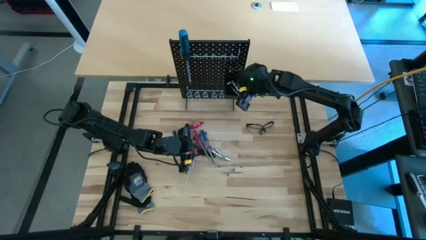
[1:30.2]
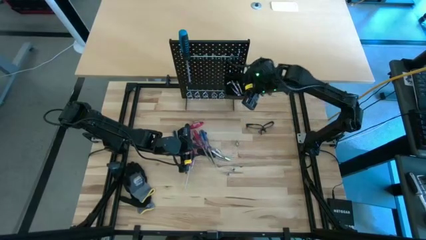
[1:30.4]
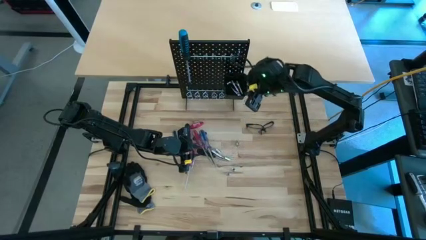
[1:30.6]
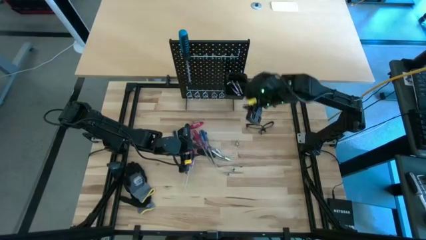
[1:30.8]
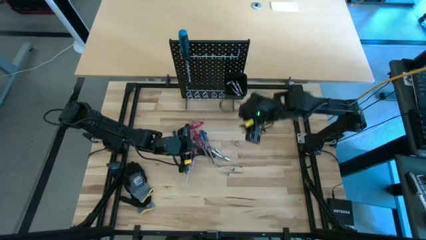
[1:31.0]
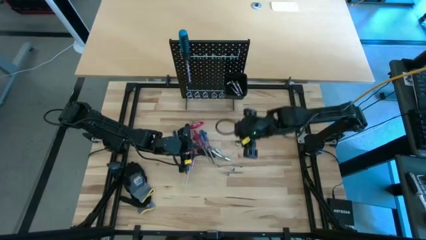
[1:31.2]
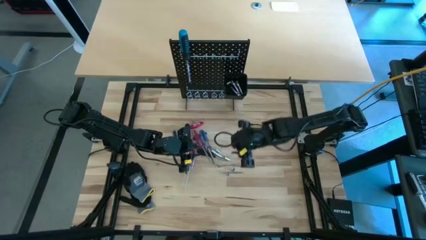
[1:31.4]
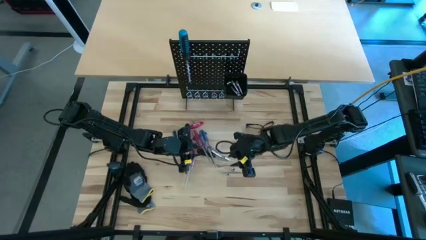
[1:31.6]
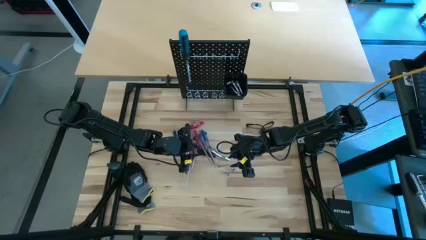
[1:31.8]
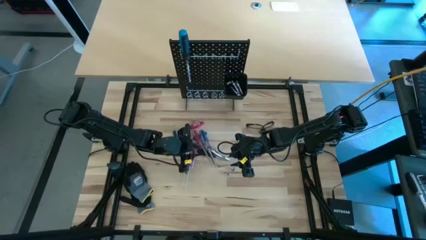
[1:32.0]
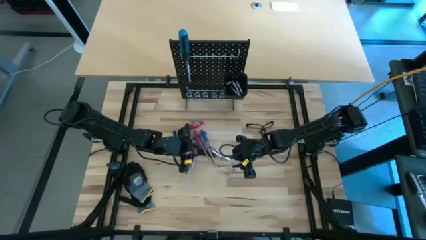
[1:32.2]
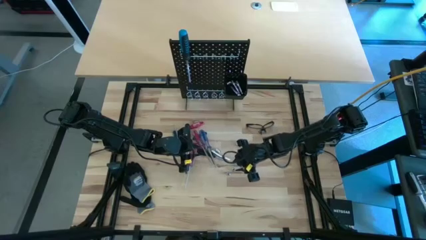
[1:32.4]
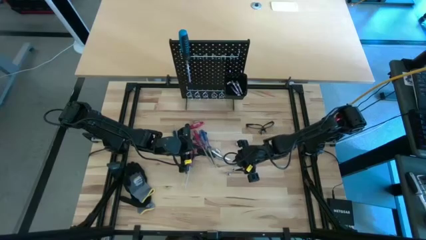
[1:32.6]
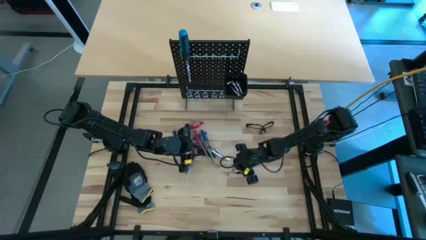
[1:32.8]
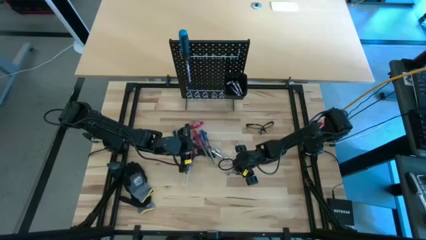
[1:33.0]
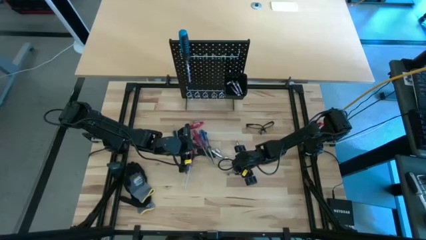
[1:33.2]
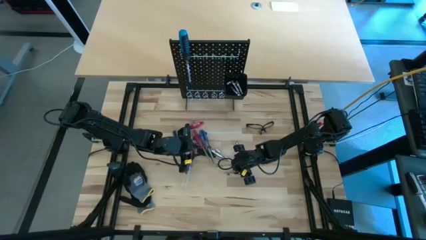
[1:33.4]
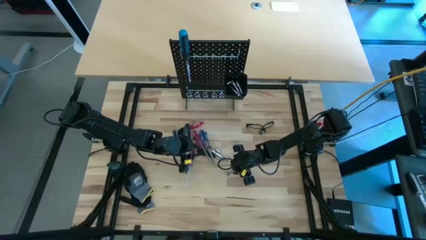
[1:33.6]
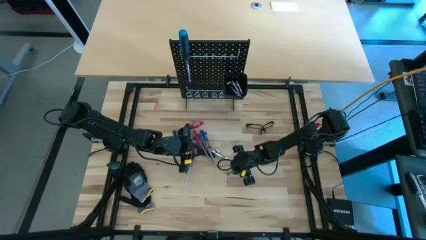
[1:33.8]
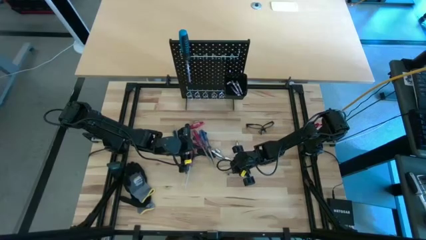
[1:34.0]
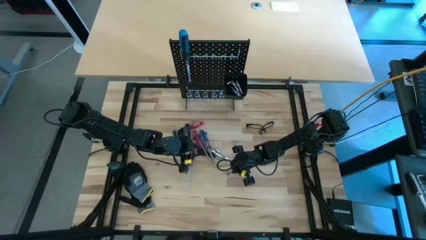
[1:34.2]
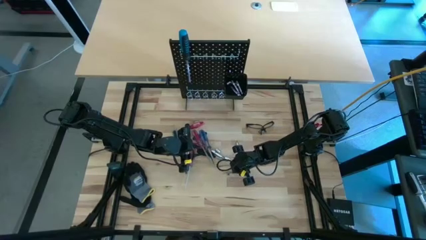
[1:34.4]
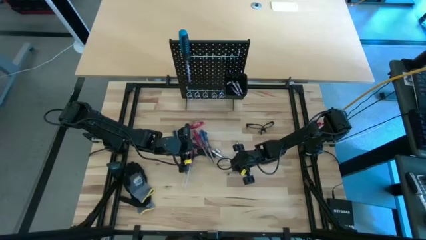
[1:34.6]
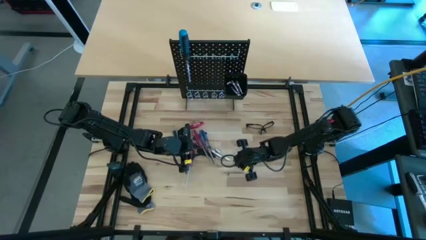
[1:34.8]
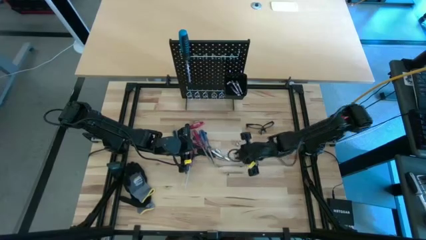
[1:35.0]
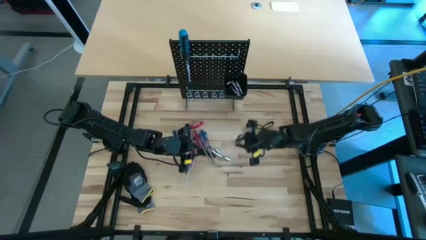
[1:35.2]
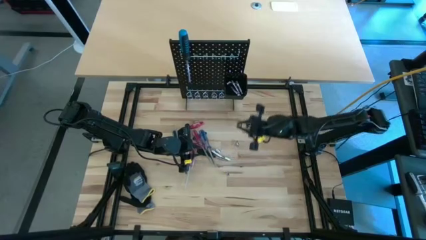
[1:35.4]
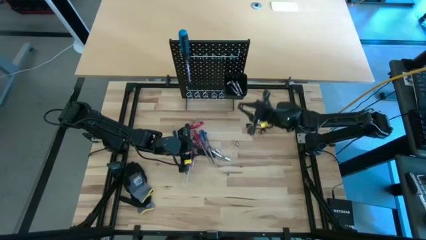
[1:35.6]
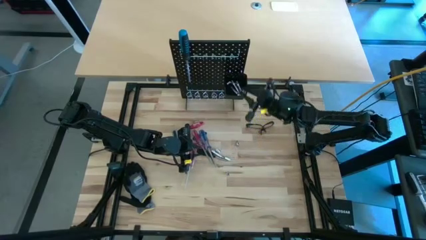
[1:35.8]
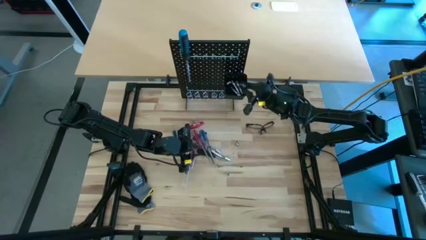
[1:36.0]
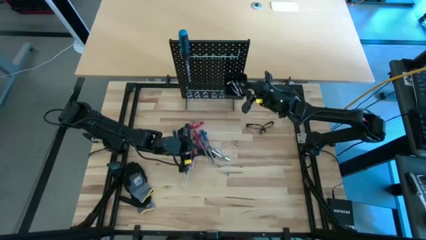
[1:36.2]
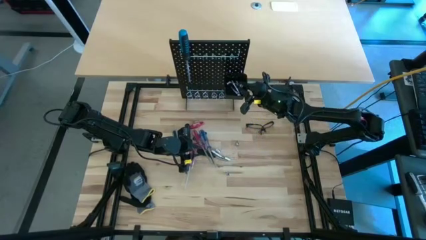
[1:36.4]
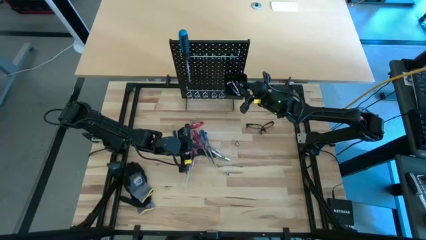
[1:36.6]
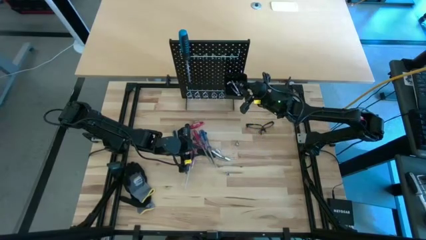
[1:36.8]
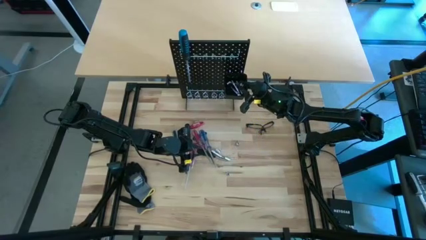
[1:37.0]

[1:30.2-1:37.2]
Task: Hang tools onto peg board
Put the silver socket into the black bin on the peg board

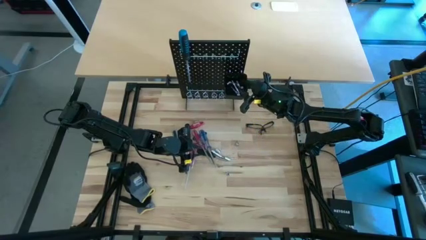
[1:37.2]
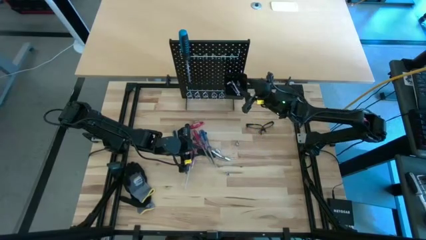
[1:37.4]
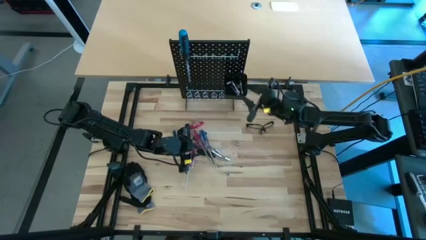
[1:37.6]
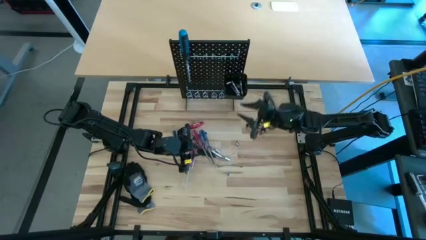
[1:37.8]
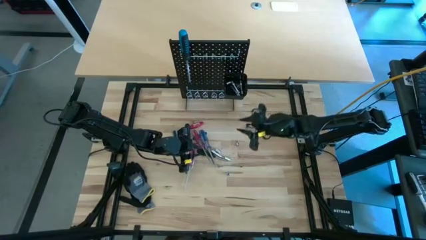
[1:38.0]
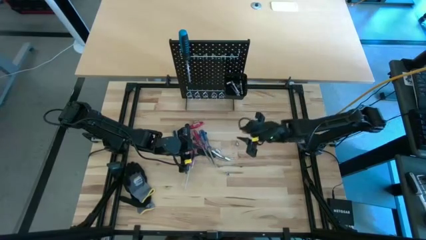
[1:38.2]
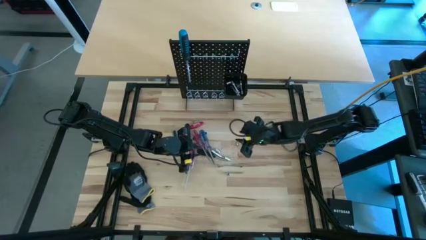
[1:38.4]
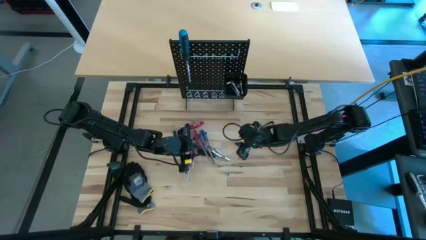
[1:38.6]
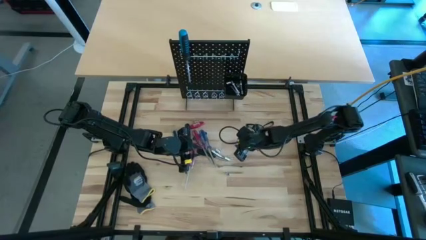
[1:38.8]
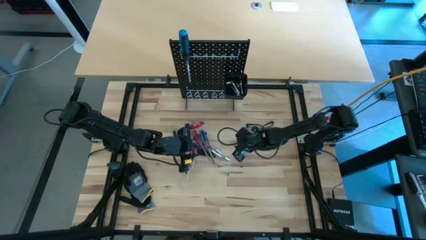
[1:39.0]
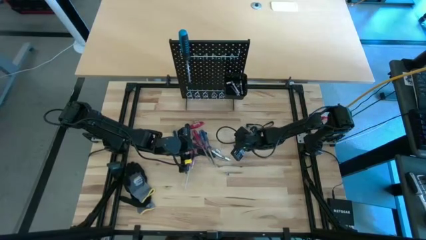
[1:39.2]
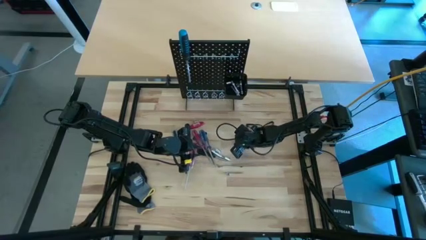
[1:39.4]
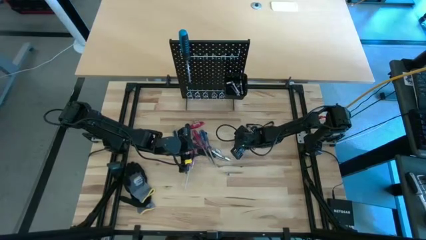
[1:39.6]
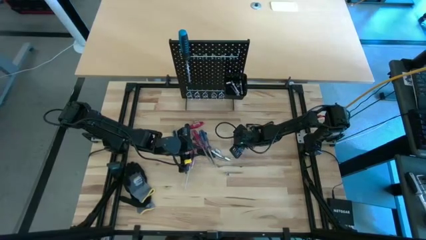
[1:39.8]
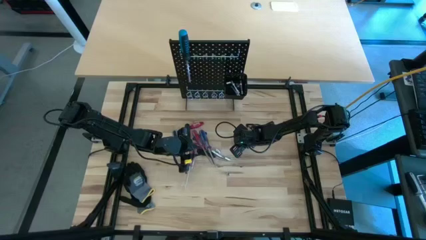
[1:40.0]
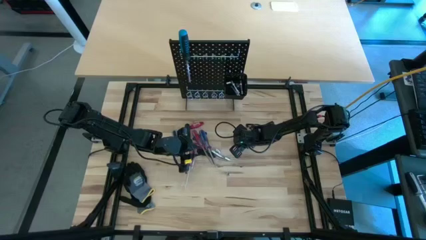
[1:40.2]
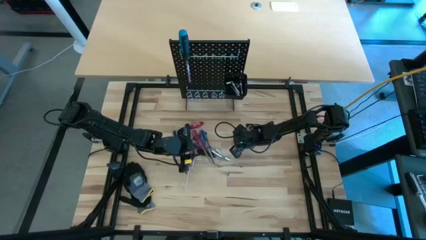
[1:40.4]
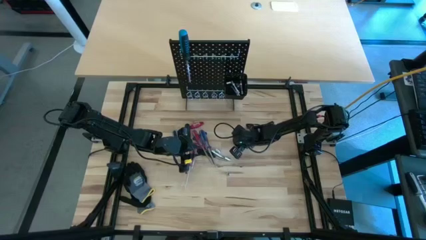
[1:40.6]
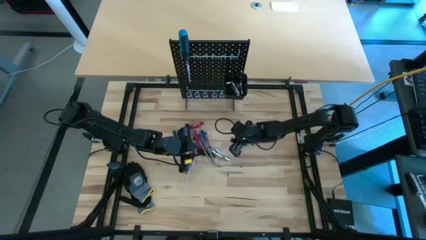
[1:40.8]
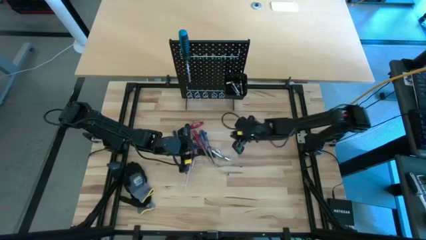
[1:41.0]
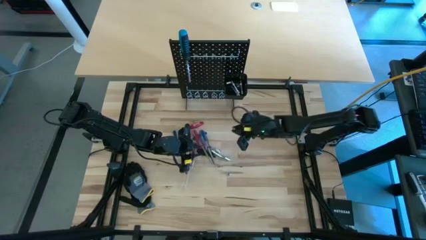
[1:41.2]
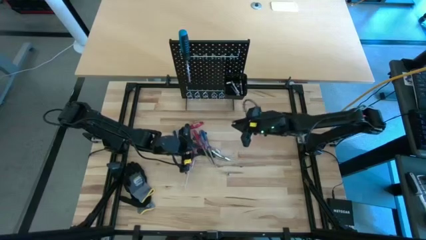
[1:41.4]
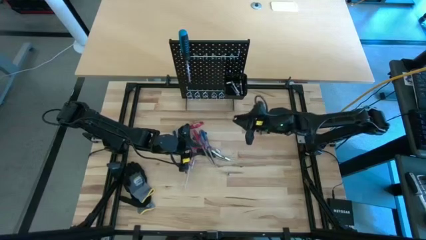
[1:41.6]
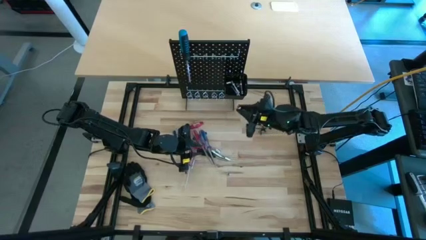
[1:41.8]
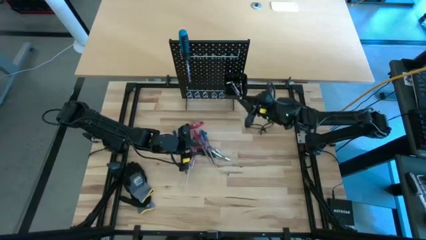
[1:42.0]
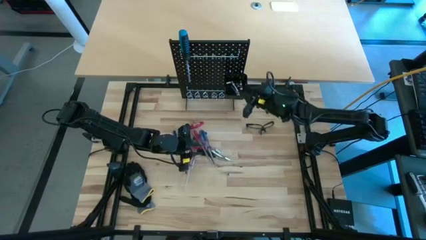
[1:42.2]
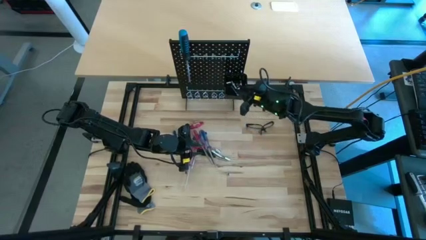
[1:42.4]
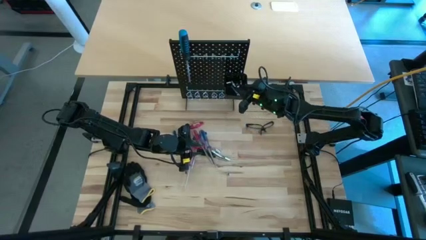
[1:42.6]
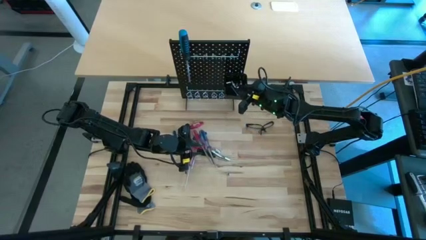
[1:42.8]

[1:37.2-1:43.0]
Put the silver socket into the black bin on the peg board

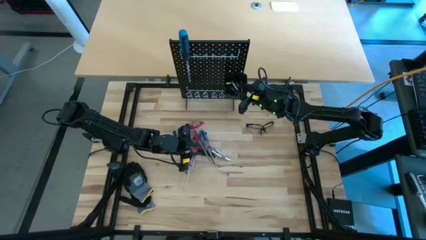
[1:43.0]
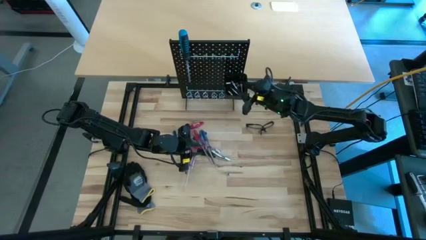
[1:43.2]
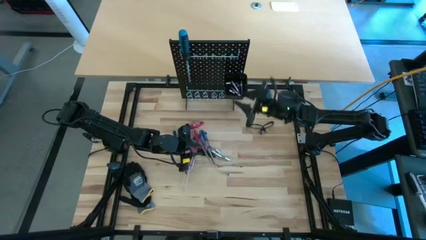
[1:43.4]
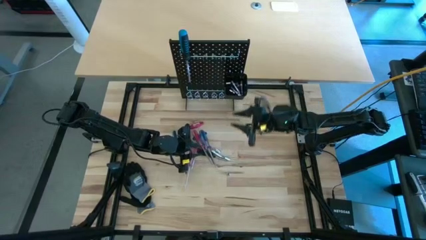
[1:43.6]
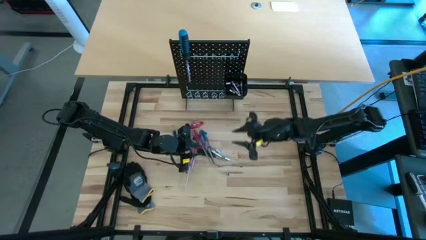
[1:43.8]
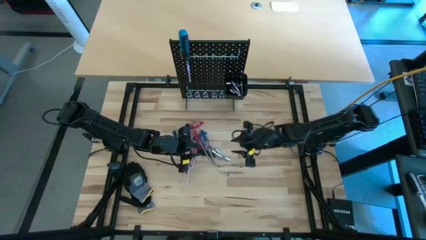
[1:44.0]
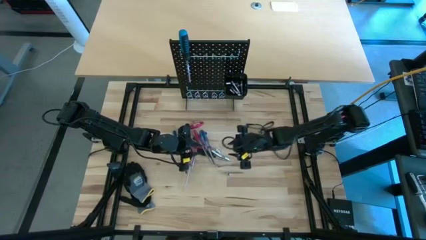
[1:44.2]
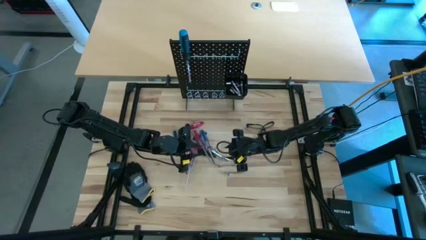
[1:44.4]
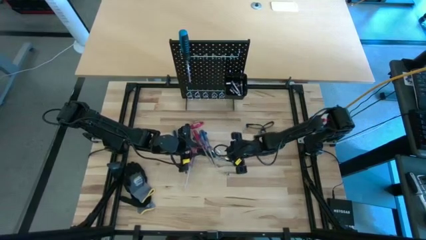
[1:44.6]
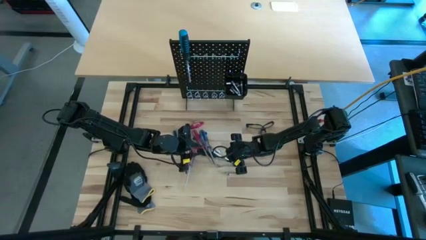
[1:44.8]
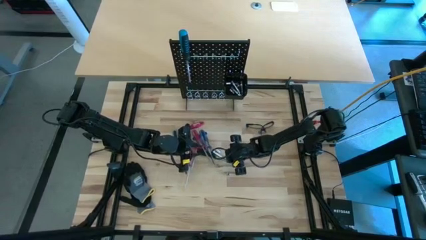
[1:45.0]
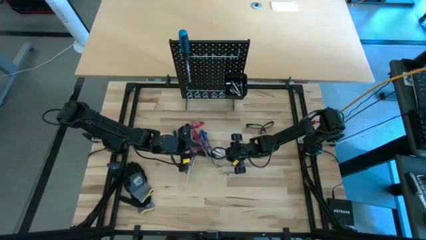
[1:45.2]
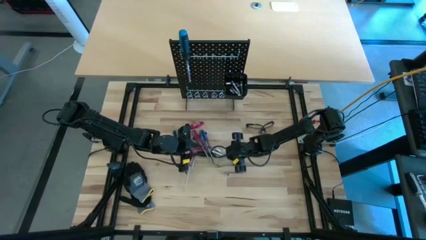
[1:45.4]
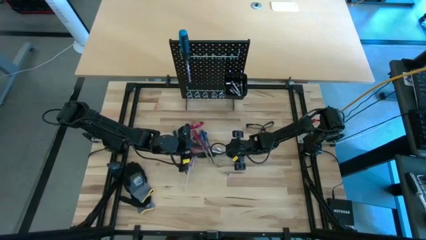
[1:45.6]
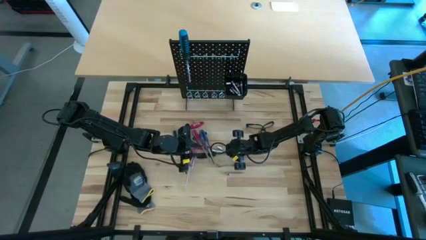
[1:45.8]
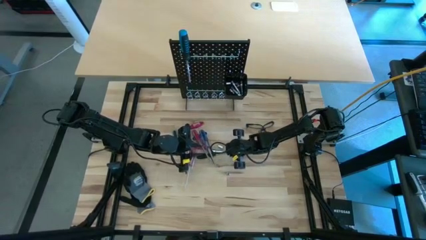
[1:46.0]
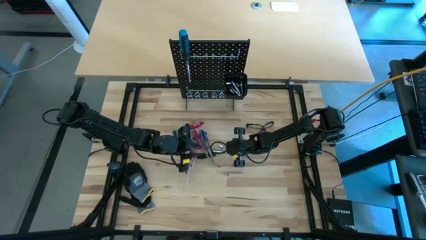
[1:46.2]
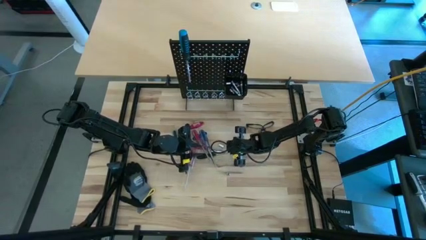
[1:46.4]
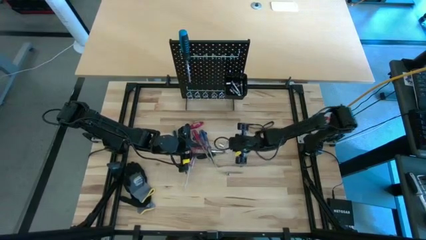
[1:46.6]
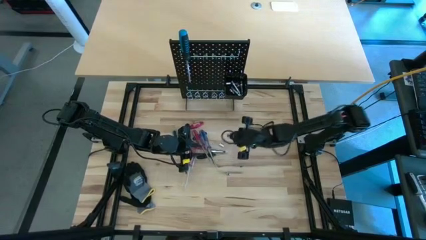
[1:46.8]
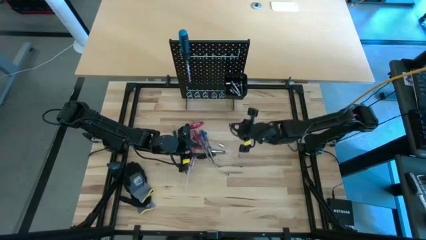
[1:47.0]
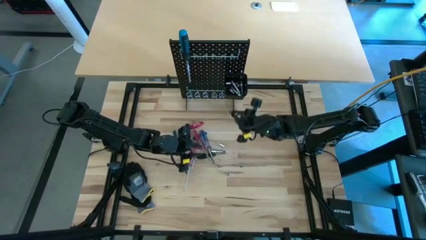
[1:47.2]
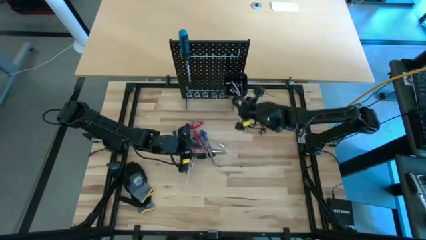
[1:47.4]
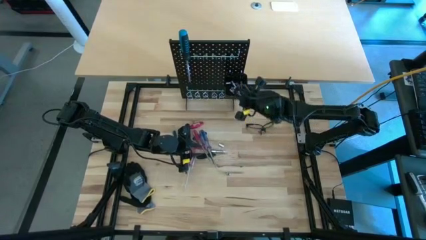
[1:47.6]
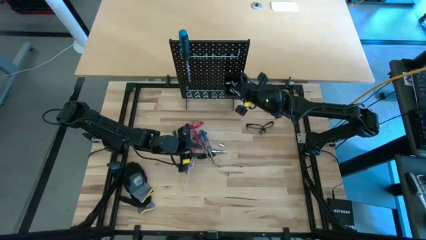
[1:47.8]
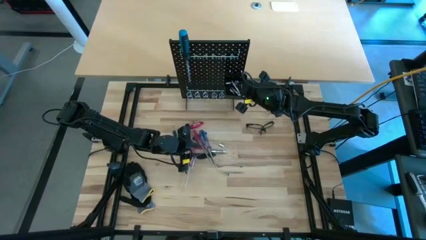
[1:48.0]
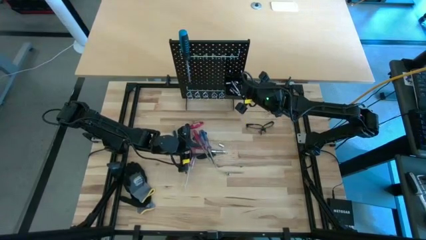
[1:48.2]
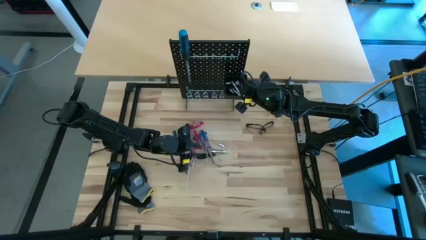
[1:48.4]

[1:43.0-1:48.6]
Put the silver socket into the black bin on the peg board
